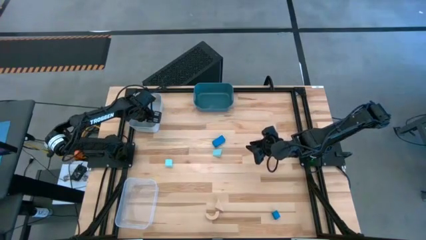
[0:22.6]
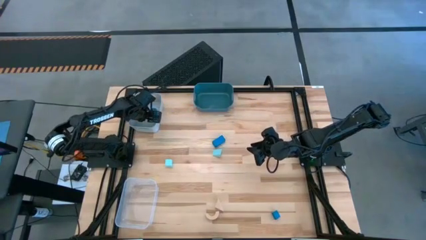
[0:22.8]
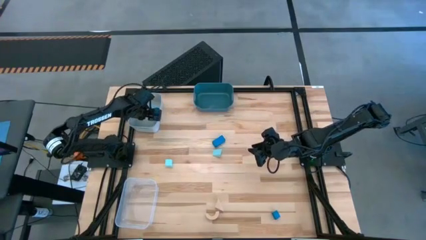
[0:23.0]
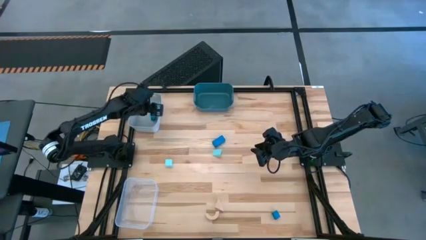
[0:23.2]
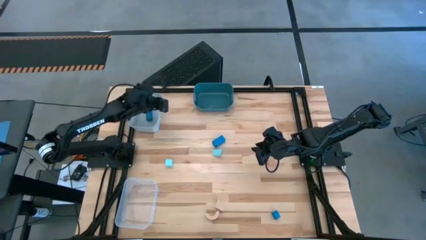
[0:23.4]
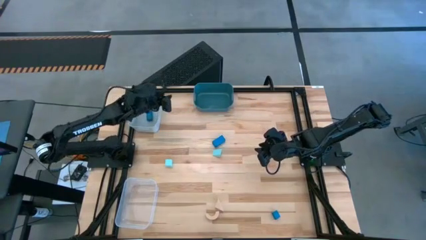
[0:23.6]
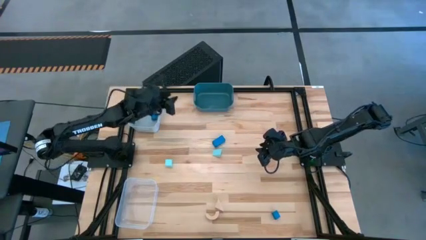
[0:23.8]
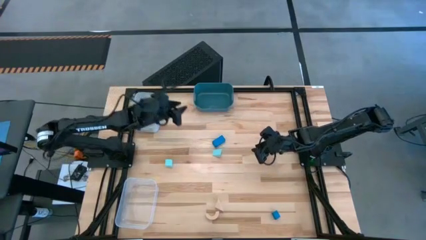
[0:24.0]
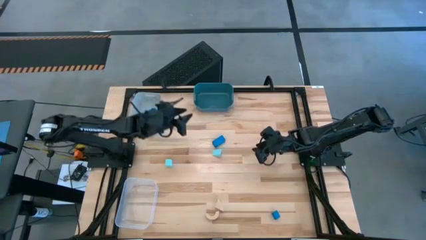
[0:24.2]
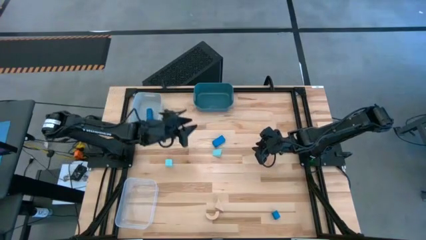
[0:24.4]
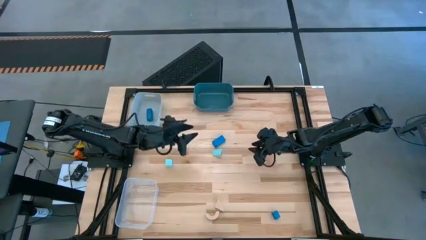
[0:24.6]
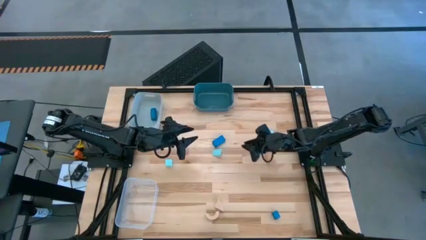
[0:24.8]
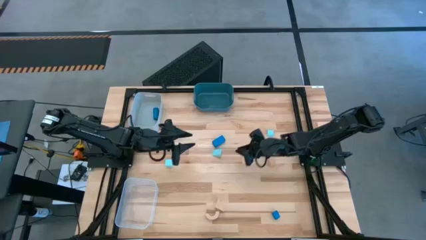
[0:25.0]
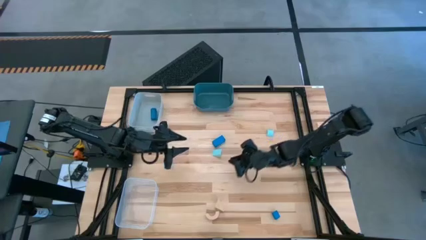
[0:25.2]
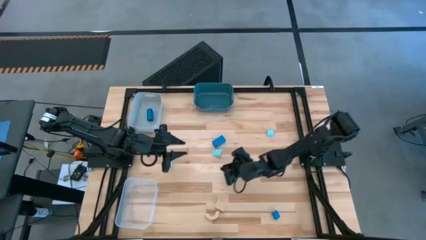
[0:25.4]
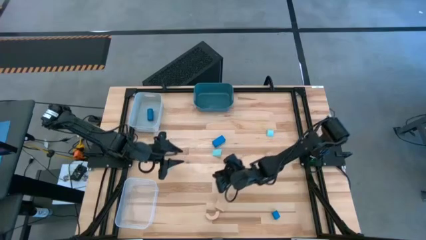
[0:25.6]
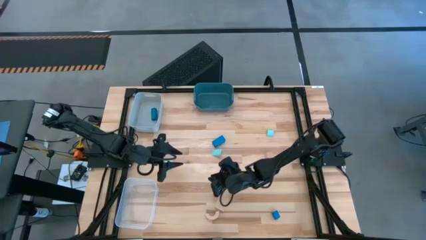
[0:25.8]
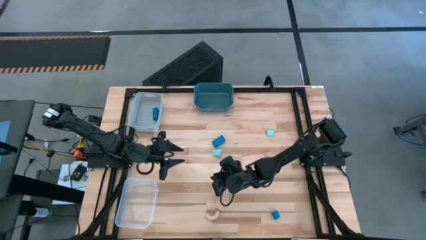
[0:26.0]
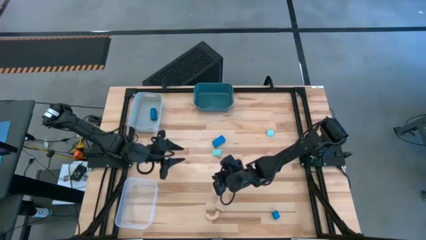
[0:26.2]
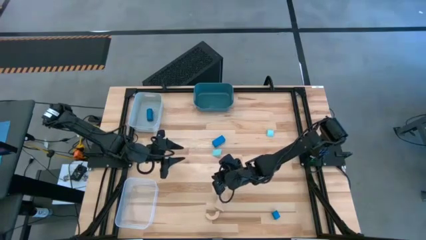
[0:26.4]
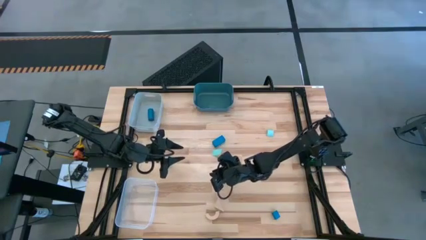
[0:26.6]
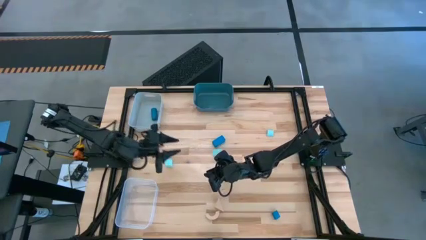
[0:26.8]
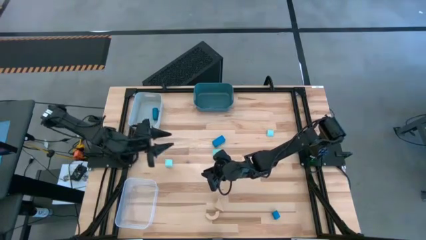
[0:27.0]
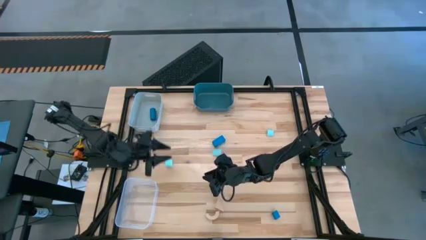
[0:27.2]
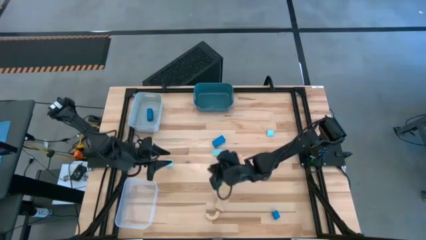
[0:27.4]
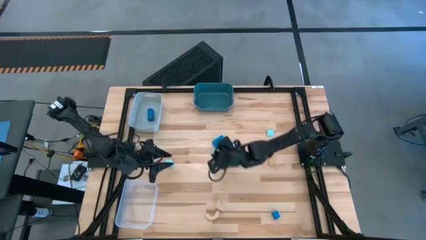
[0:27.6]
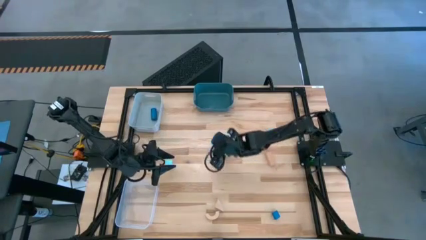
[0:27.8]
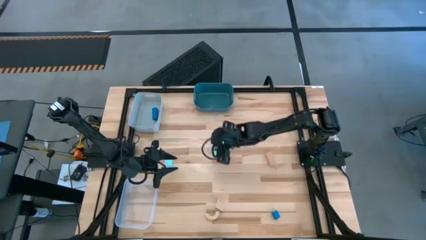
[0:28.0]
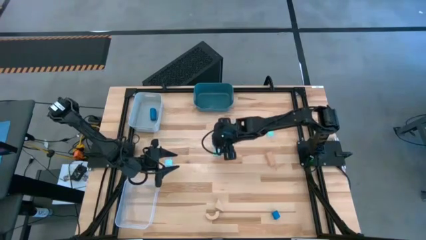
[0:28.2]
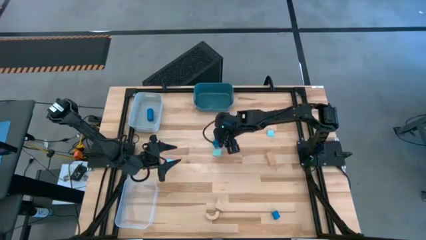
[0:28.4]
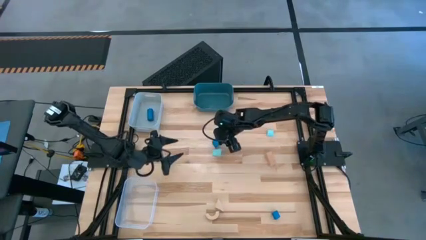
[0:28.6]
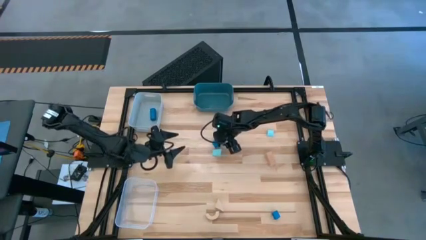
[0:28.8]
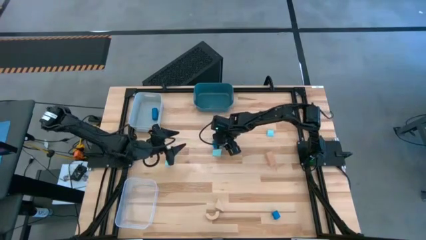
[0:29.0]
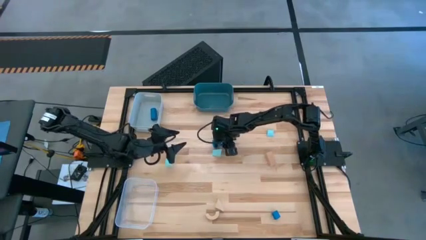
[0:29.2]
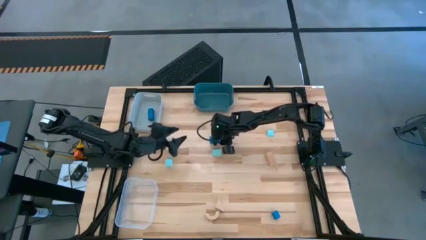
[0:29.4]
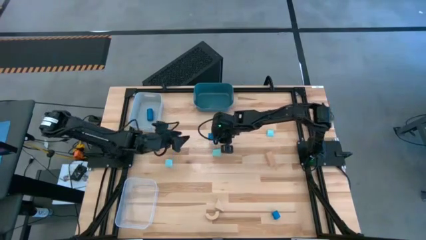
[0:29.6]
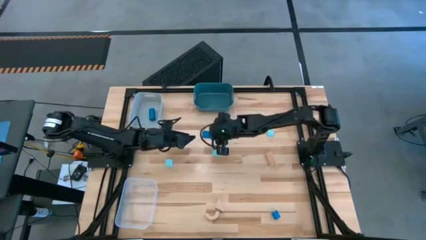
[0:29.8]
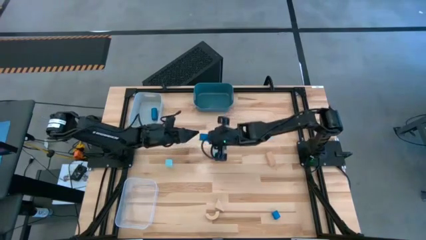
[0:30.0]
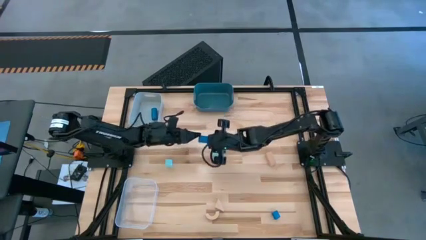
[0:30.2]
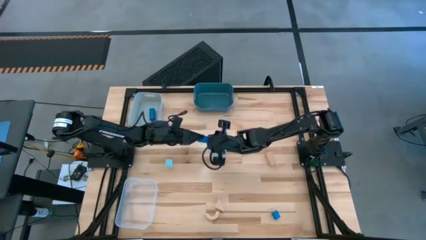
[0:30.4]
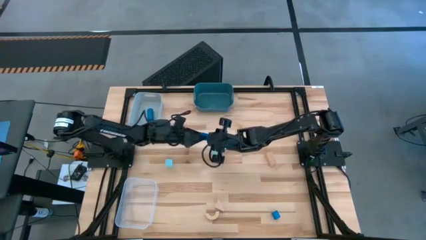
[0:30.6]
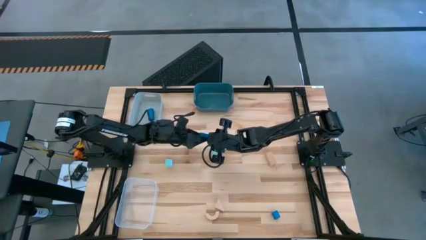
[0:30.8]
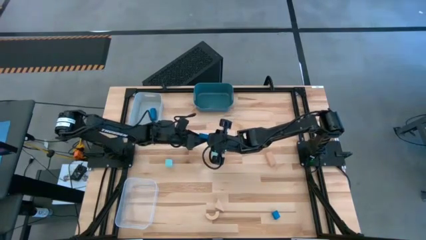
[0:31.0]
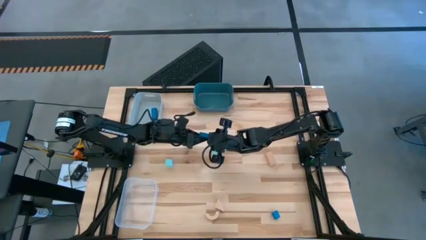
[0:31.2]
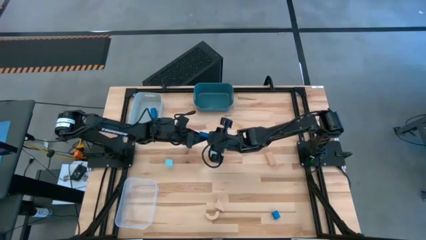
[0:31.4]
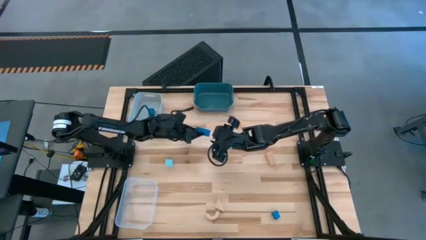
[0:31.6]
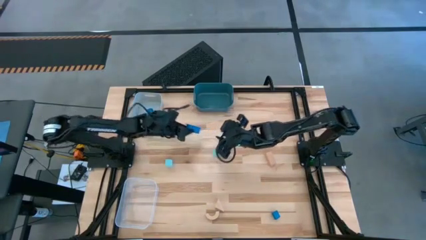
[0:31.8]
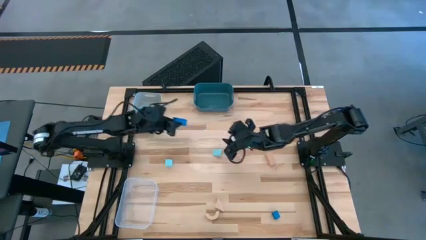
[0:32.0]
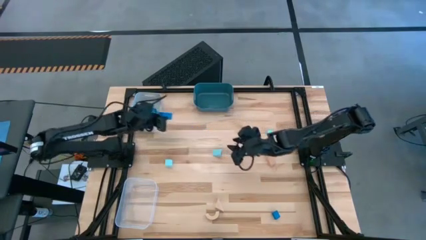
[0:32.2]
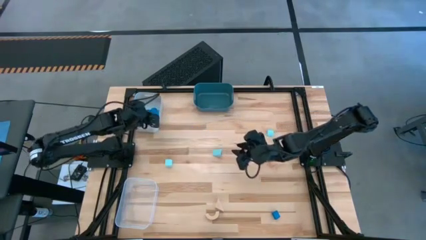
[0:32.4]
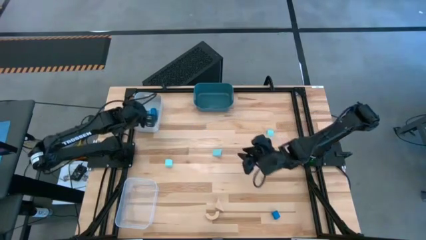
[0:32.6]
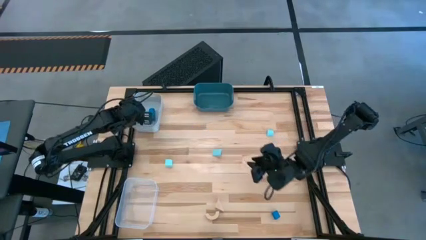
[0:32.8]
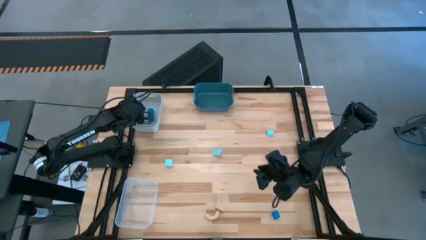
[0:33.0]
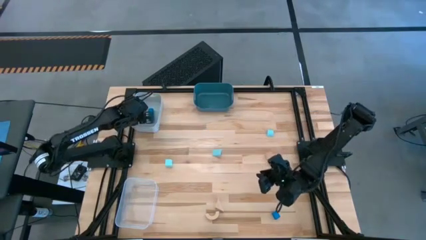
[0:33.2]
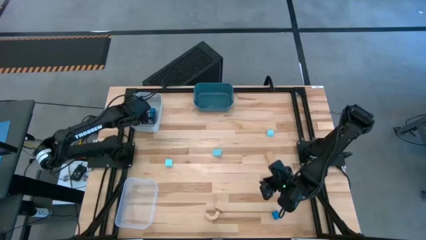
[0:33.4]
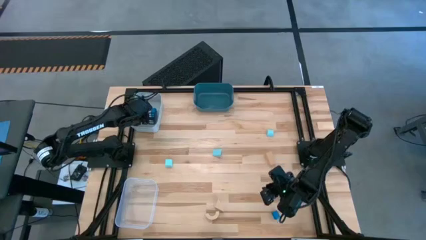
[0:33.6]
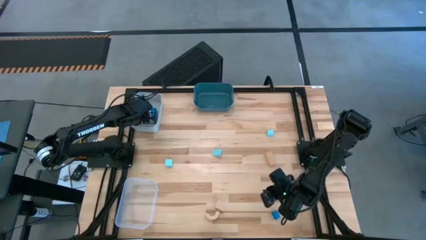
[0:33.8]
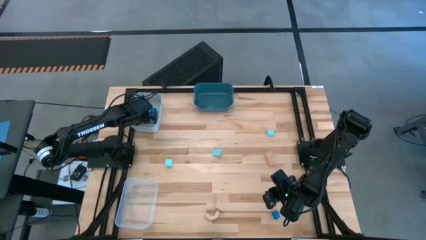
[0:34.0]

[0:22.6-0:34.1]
Task: Sort & place blocks by color
Put the top blue block into the gray bin
